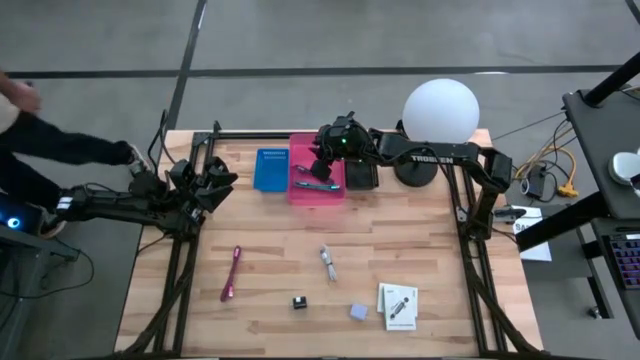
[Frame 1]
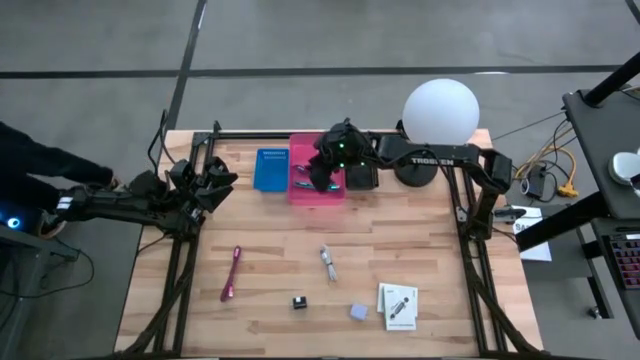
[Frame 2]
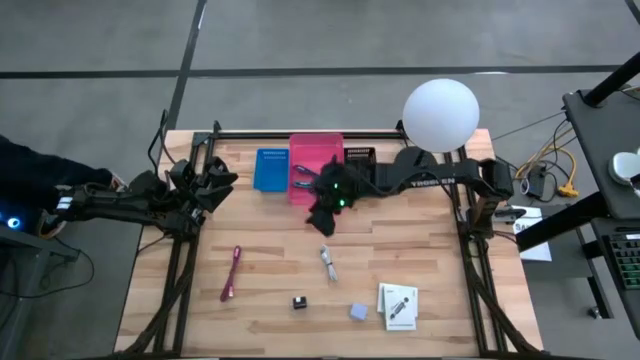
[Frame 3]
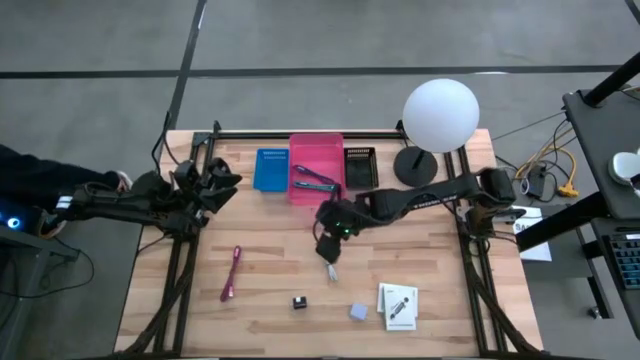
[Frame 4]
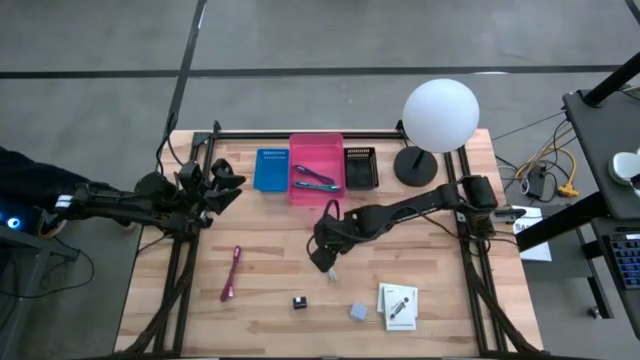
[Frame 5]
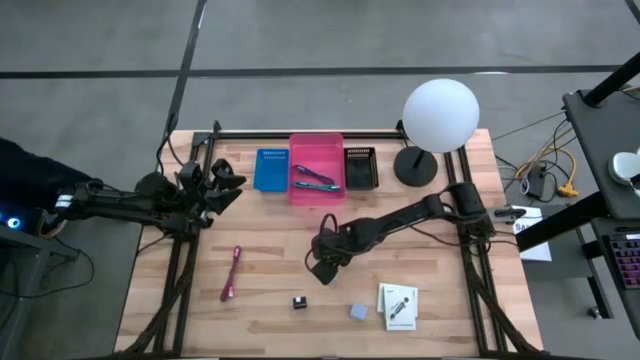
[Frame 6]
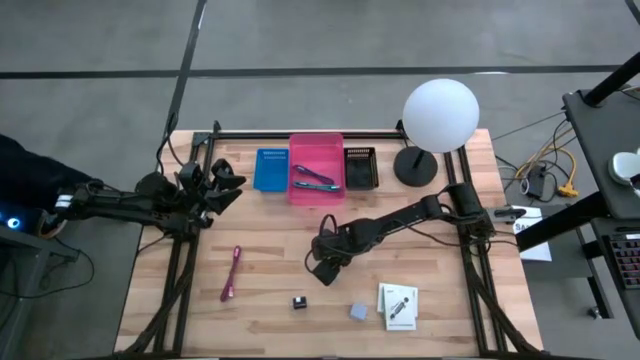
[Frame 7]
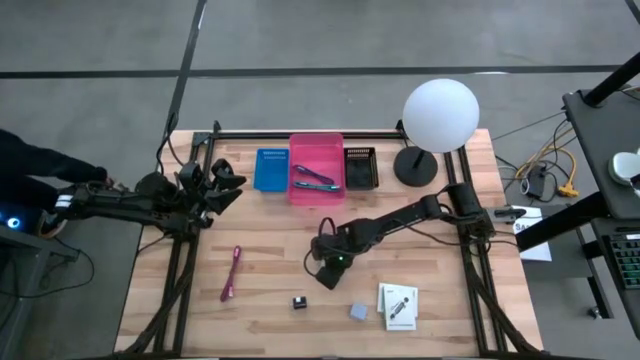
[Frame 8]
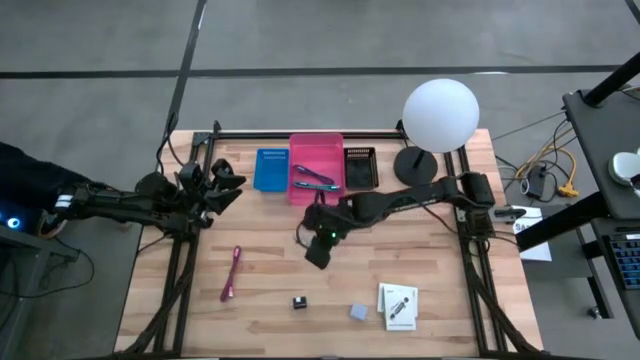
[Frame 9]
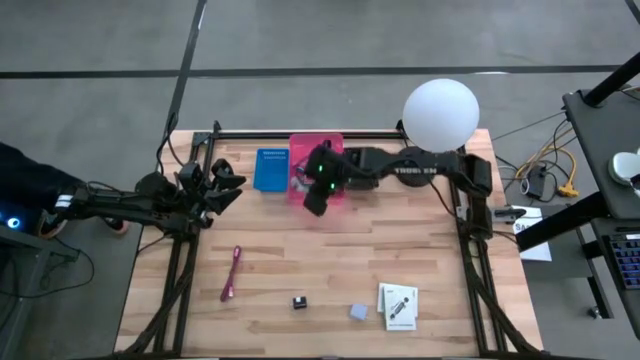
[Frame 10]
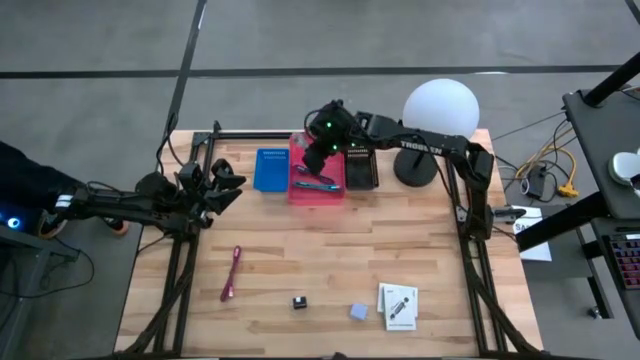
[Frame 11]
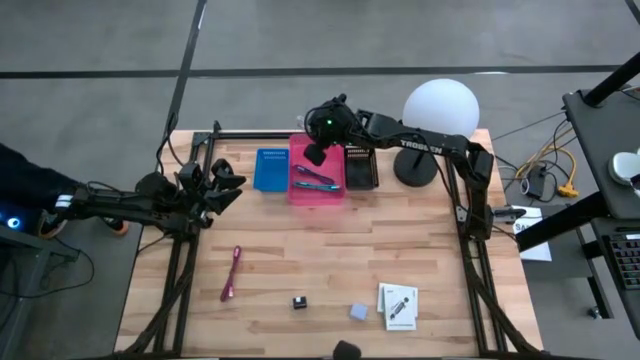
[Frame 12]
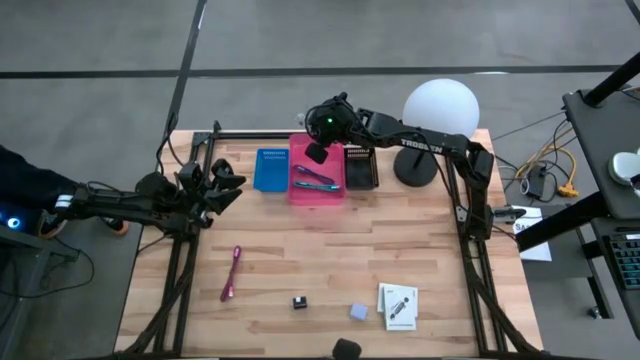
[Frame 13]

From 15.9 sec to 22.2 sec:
Task: Pick and place items into bin
Put the white charger cable into the pink bin

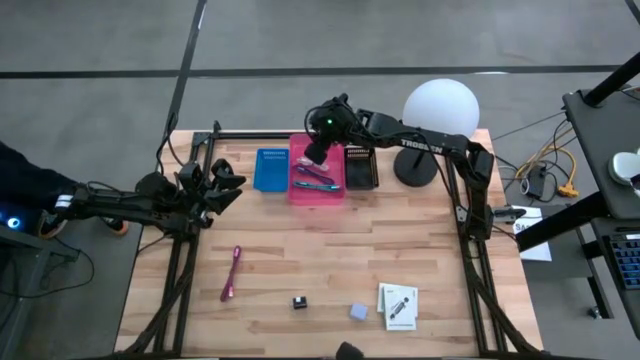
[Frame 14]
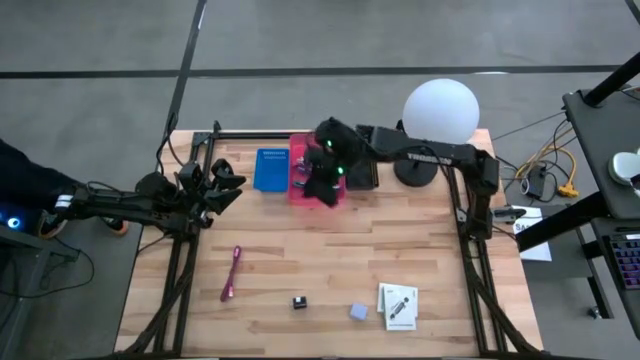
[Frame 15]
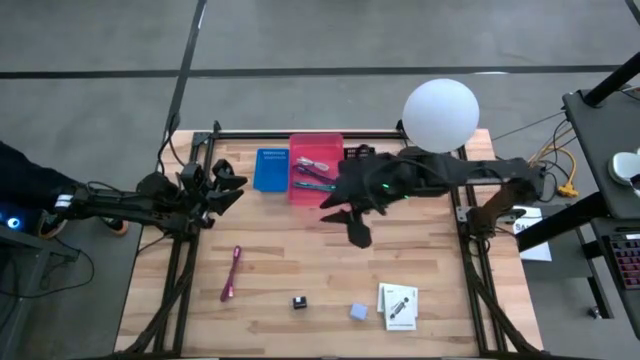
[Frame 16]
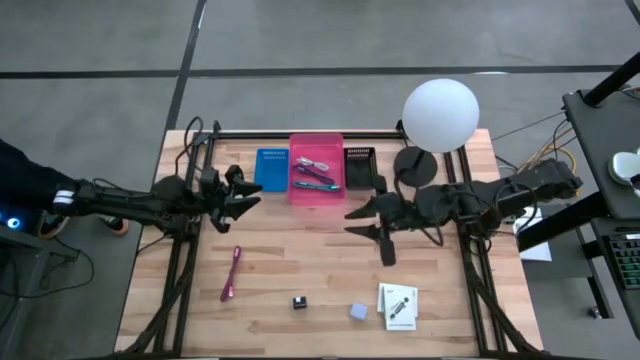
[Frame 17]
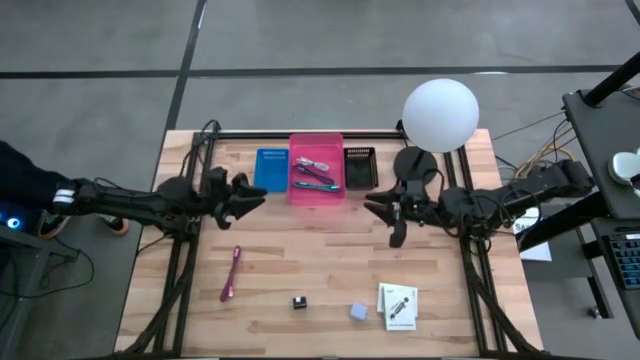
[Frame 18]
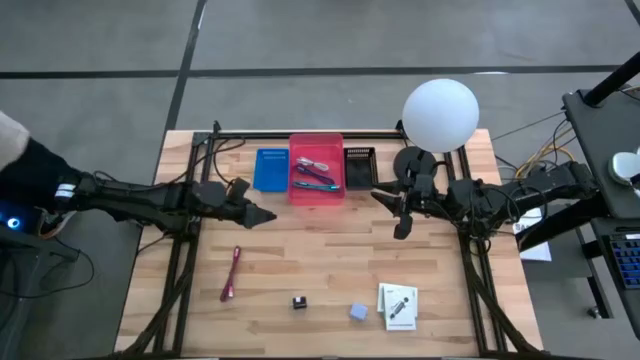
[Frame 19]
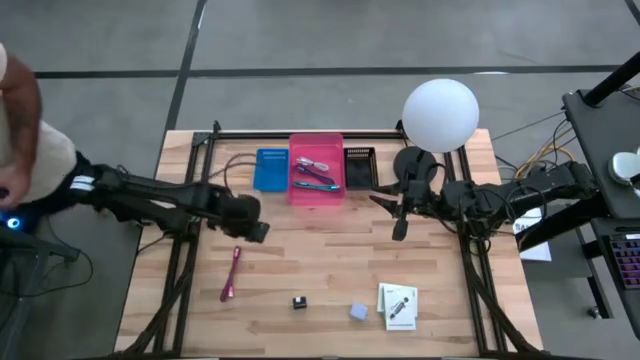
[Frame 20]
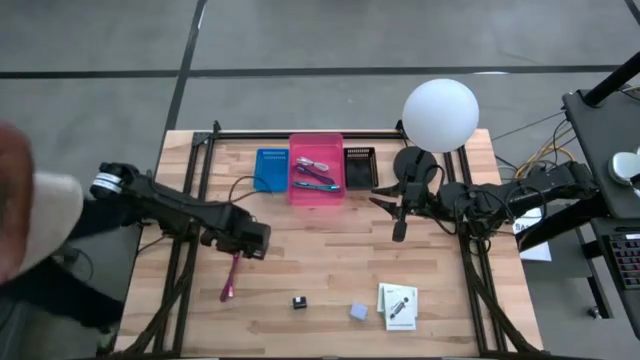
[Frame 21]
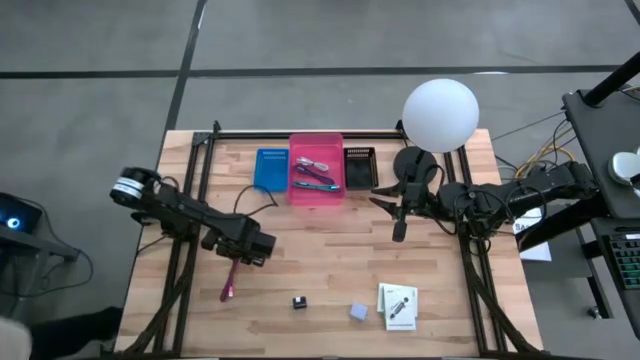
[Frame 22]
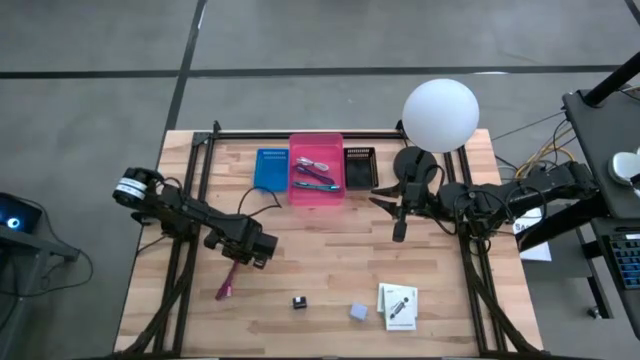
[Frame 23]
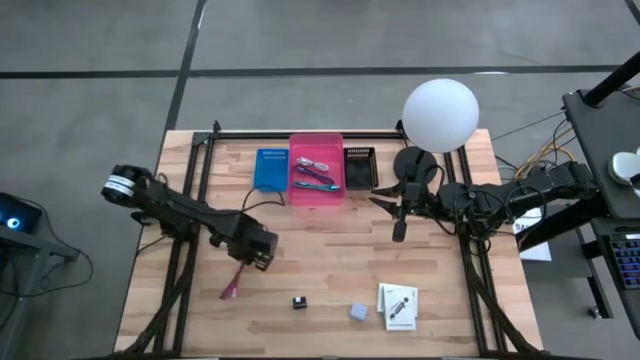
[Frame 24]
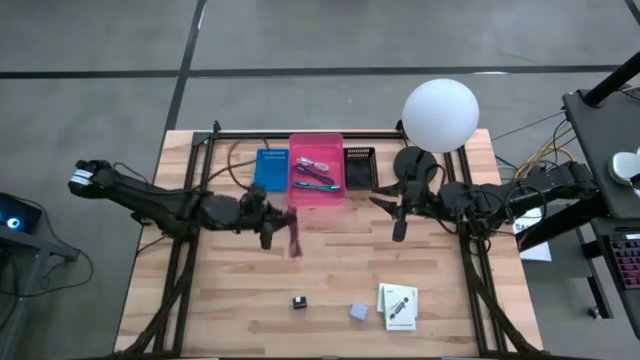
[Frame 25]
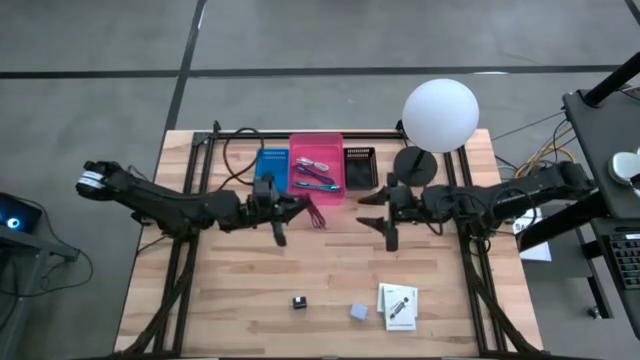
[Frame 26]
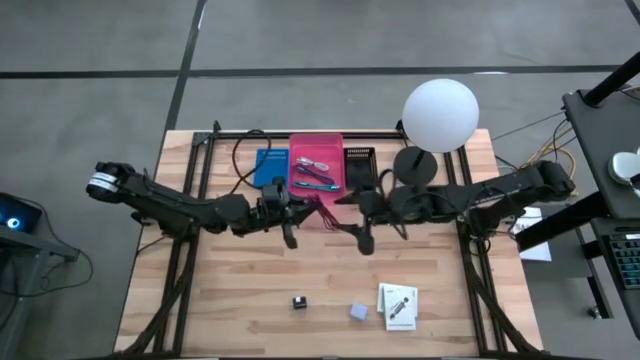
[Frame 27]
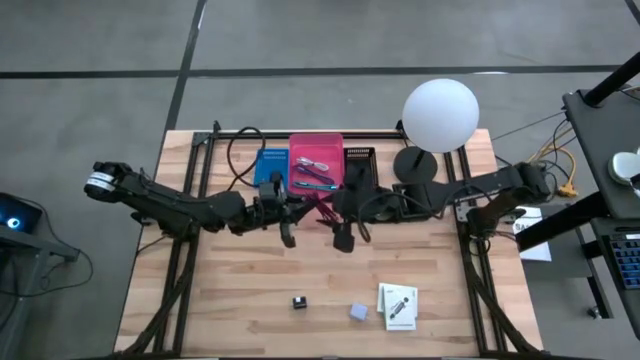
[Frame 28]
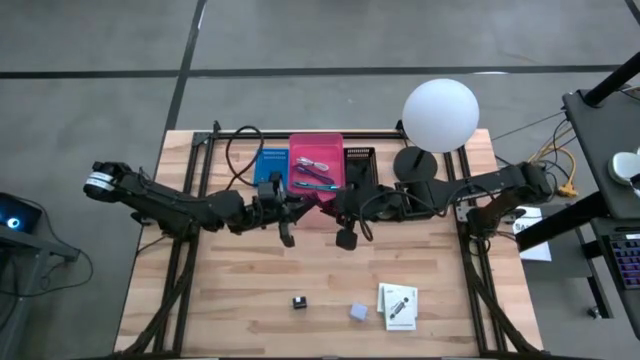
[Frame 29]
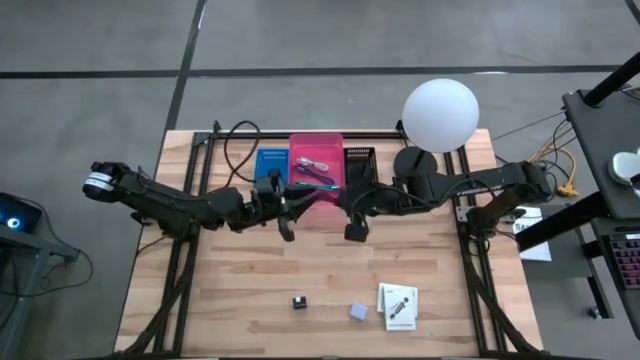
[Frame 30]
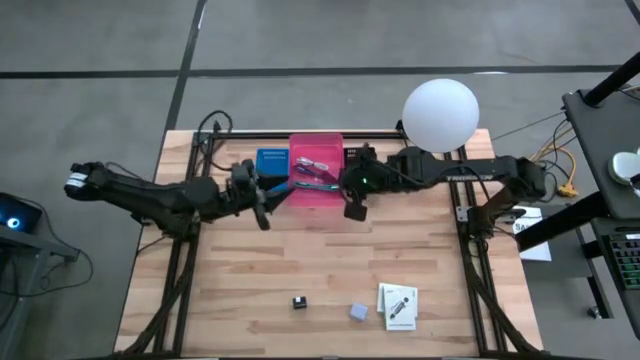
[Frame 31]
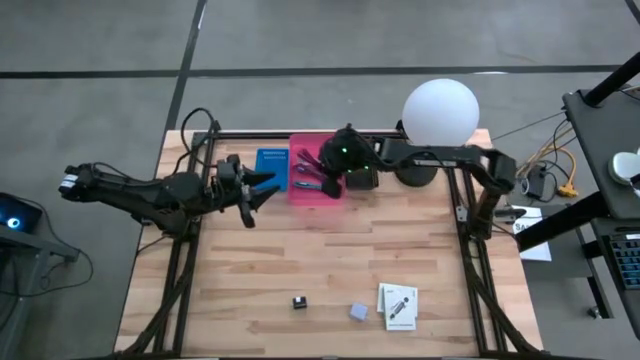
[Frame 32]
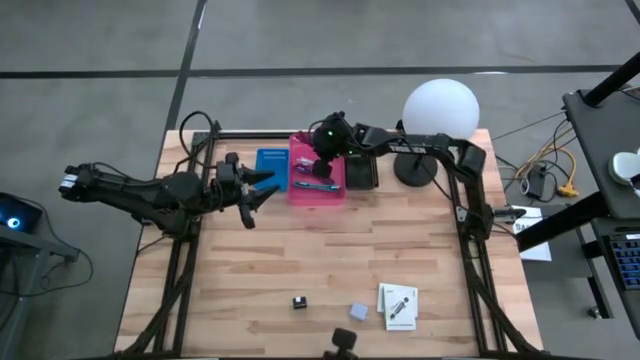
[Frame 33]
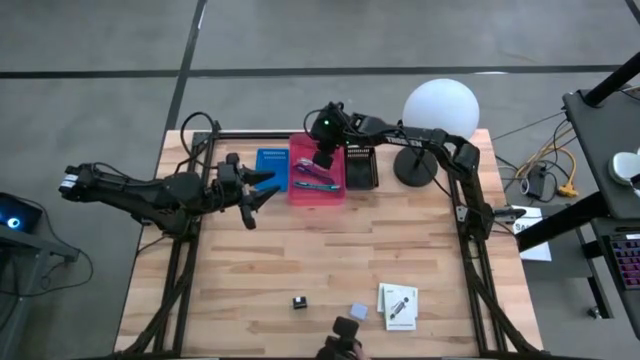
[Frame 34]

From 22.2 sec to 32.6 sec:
Put the pink charger cable into the pink bin

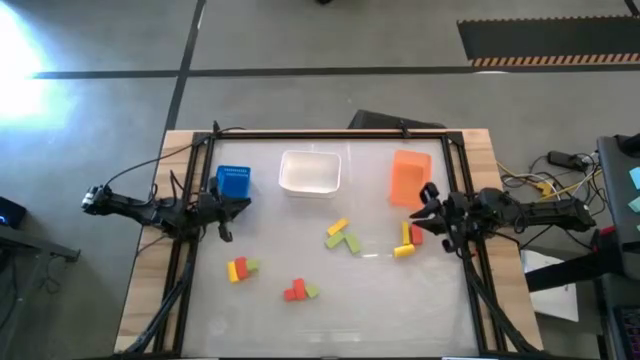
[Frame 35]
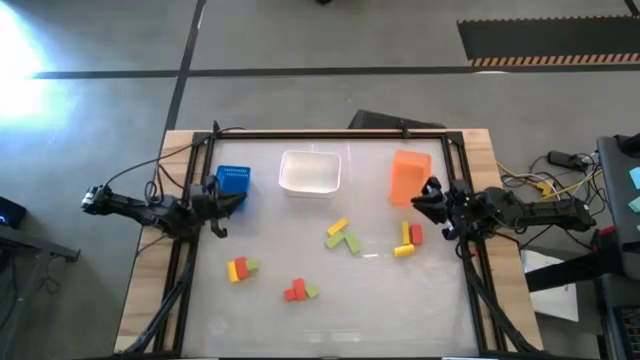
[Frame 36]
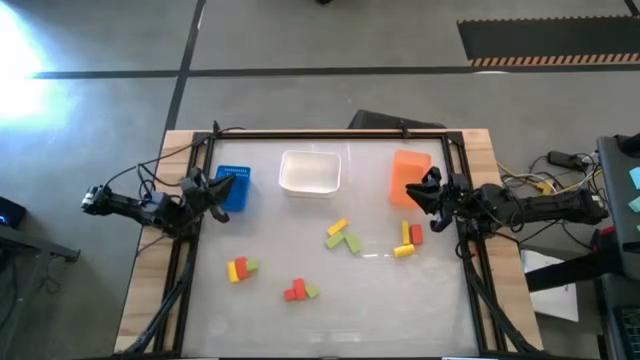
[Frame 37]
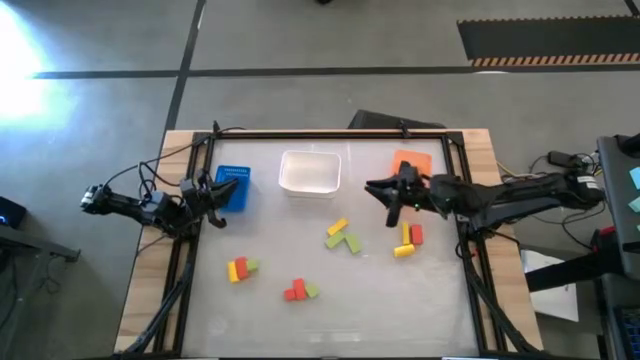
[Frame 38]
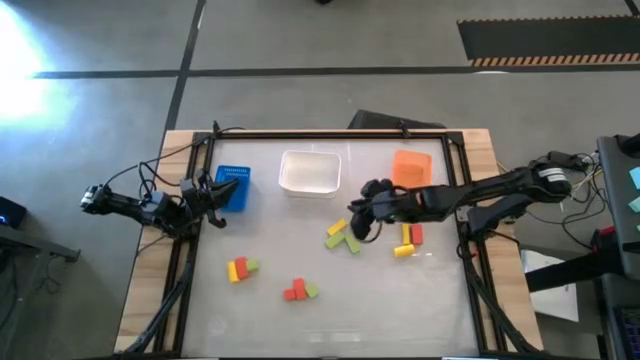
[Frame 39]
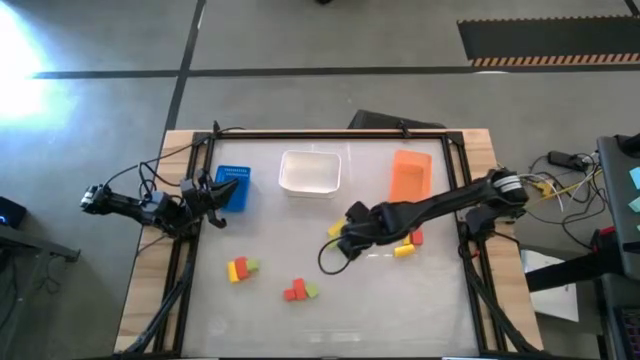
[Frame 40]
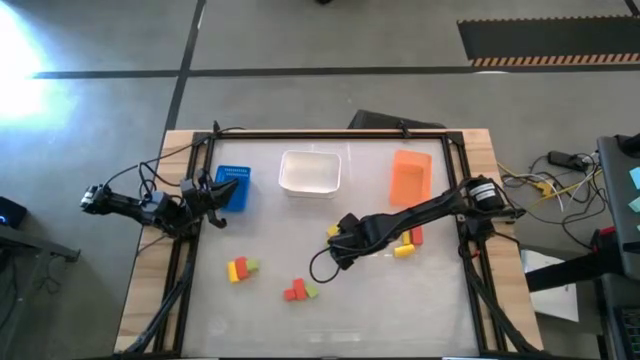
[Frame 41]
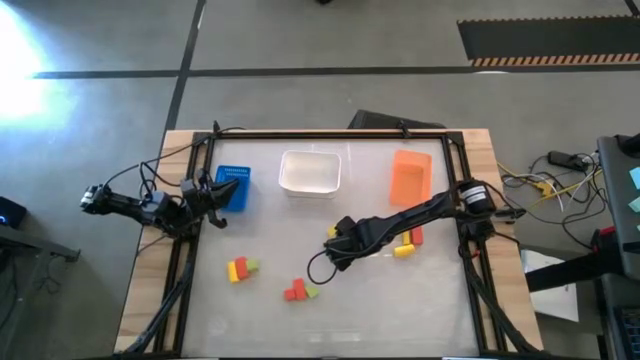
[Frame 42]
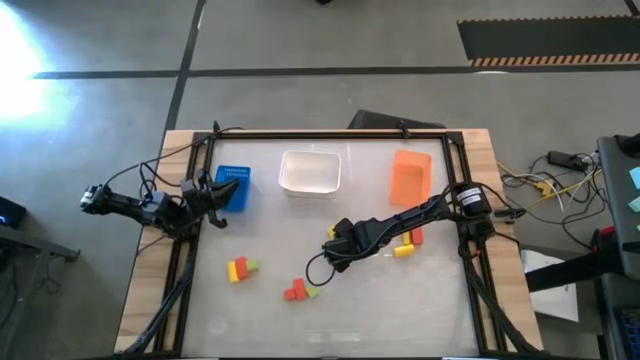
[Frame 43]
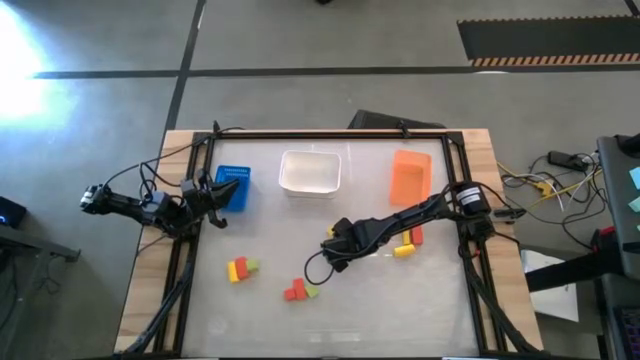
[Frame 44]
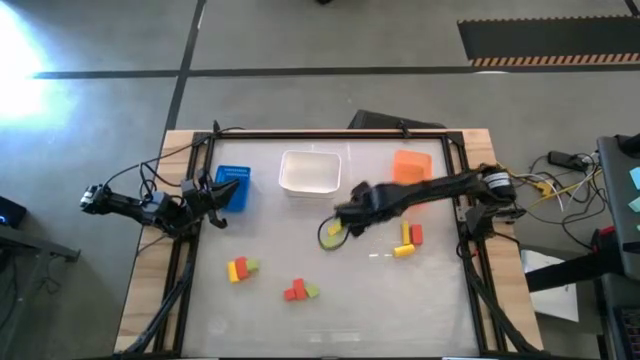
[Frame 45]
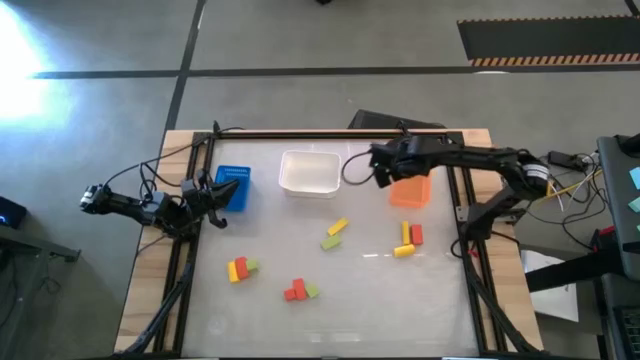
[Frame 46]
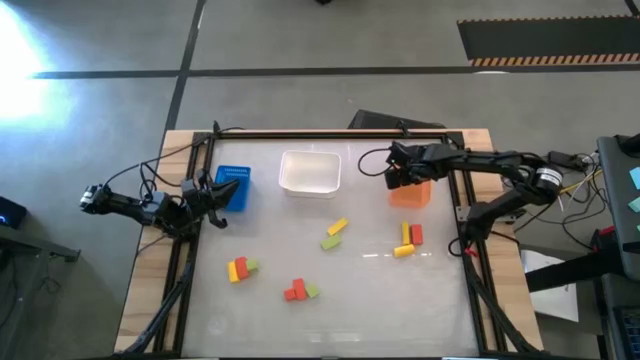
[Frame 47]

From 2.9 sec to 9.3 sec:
Task: Sort & place blocks by color
Put the top right green block into the orange bin
